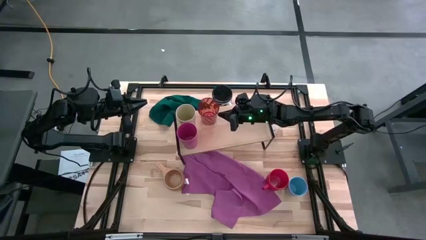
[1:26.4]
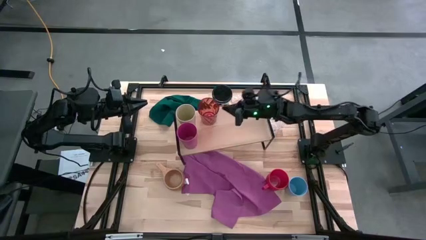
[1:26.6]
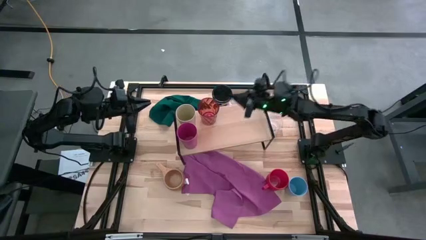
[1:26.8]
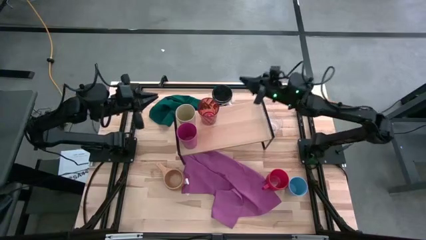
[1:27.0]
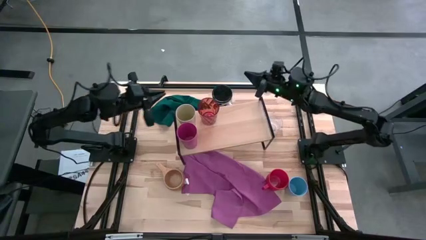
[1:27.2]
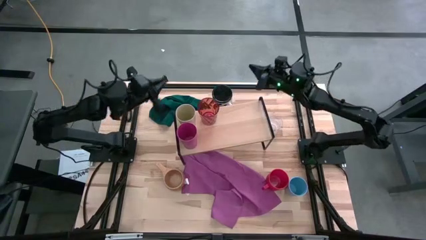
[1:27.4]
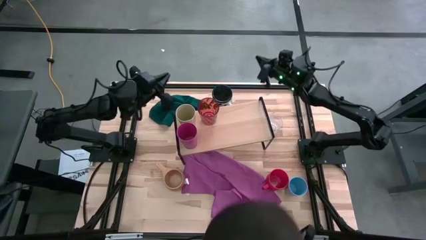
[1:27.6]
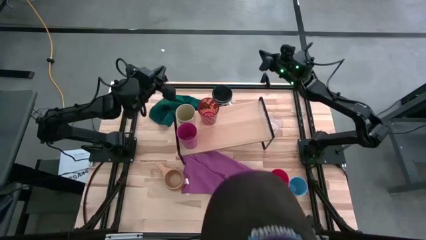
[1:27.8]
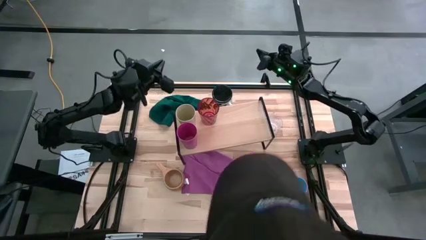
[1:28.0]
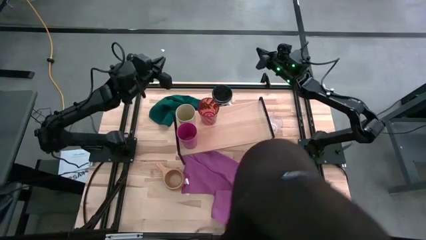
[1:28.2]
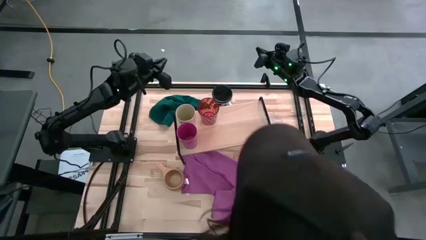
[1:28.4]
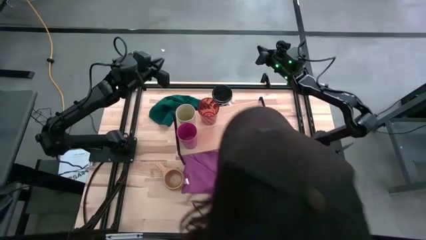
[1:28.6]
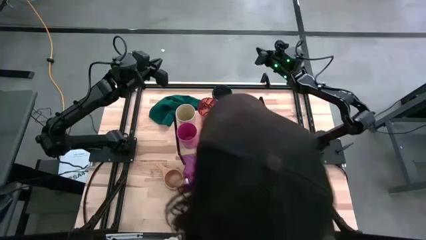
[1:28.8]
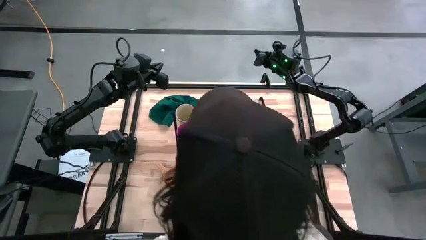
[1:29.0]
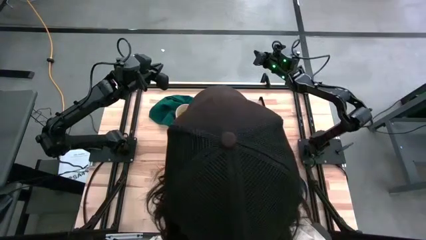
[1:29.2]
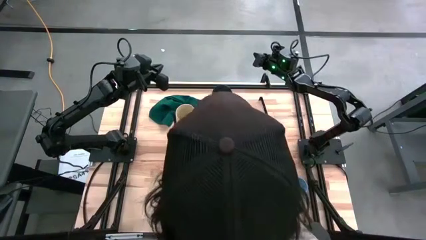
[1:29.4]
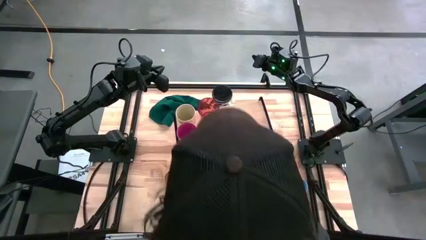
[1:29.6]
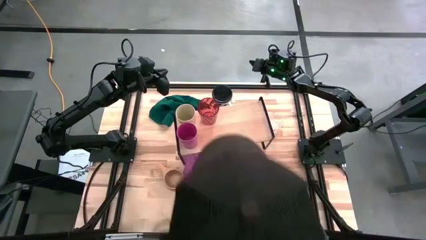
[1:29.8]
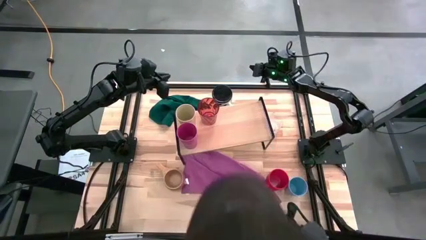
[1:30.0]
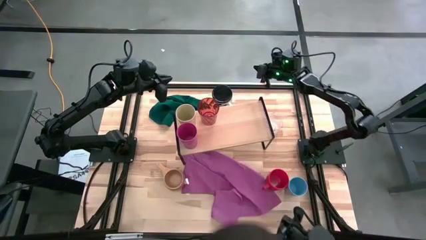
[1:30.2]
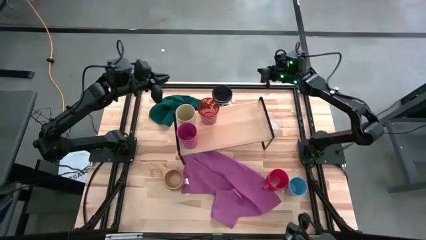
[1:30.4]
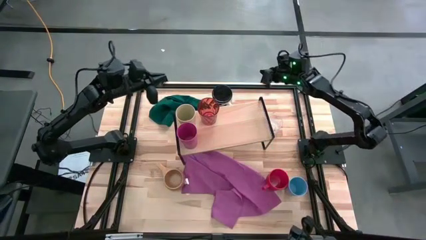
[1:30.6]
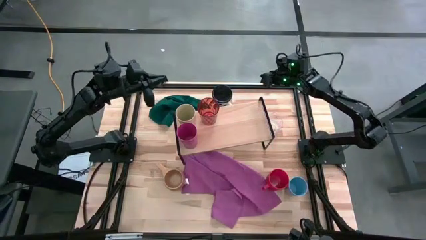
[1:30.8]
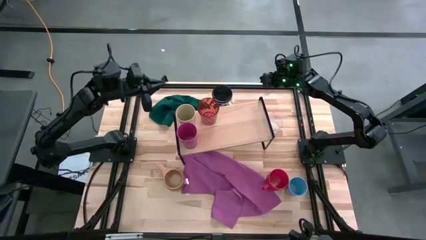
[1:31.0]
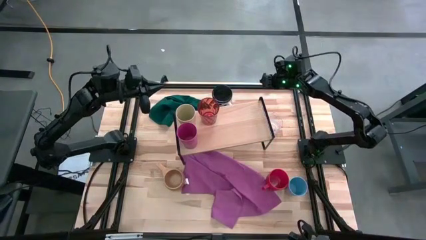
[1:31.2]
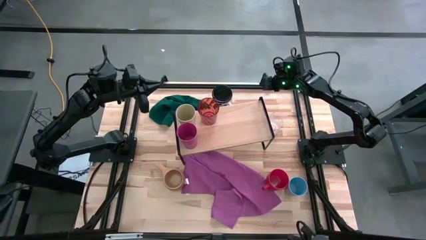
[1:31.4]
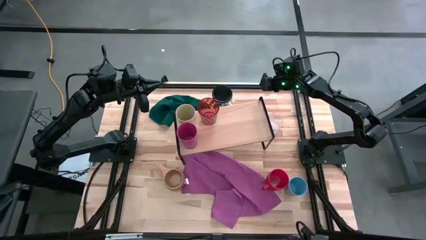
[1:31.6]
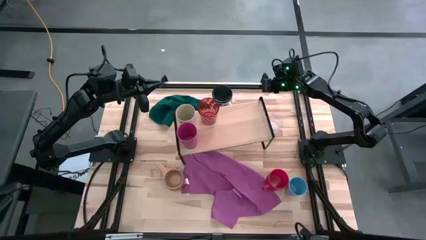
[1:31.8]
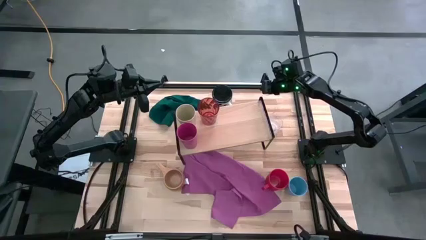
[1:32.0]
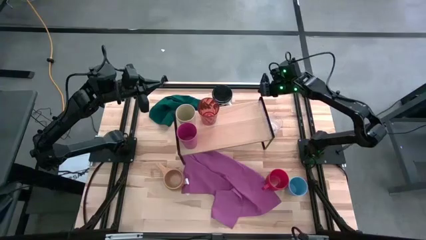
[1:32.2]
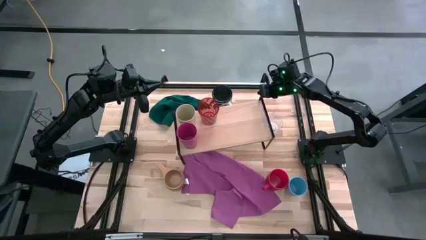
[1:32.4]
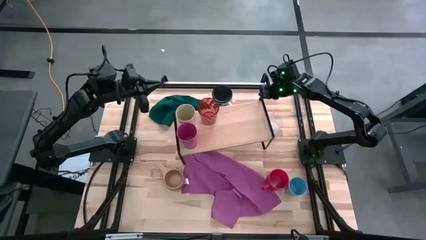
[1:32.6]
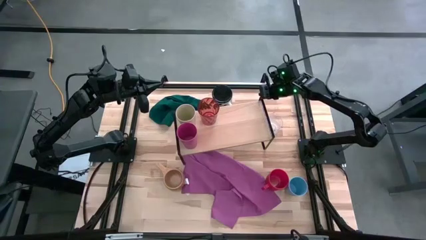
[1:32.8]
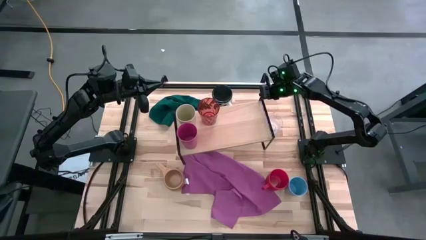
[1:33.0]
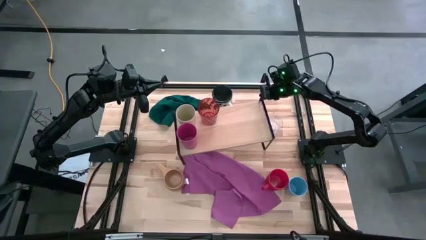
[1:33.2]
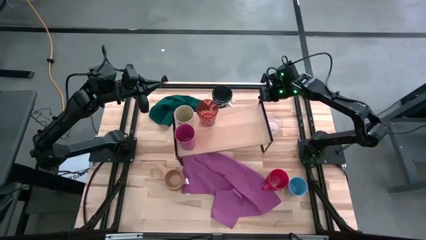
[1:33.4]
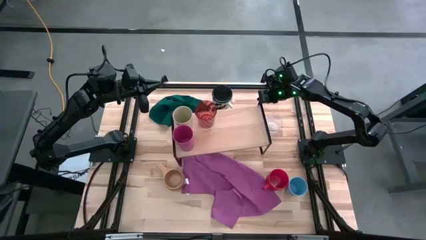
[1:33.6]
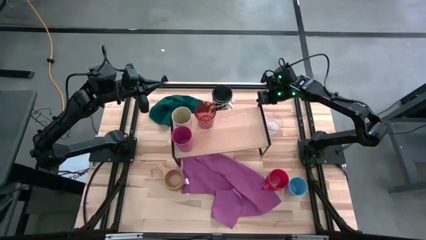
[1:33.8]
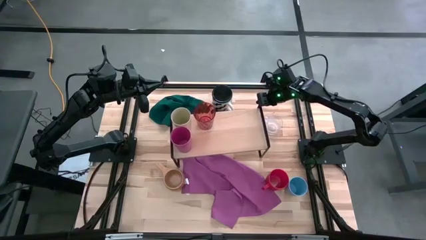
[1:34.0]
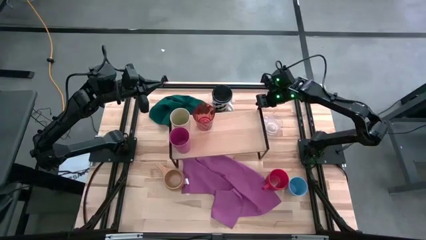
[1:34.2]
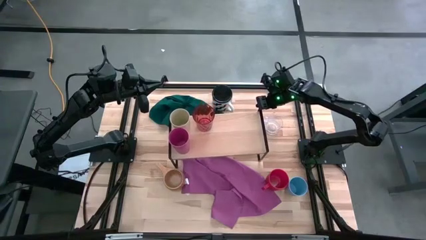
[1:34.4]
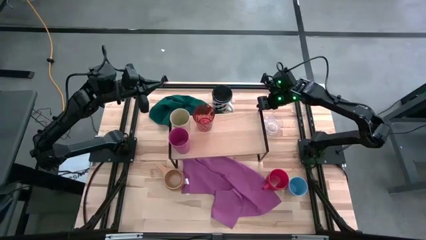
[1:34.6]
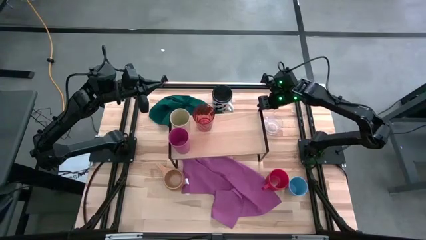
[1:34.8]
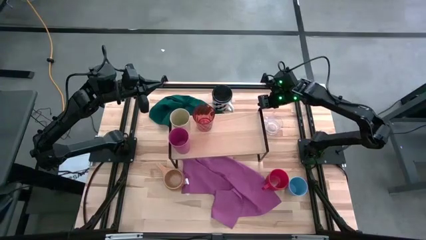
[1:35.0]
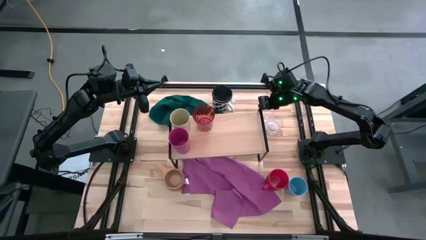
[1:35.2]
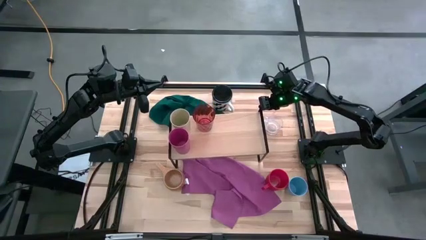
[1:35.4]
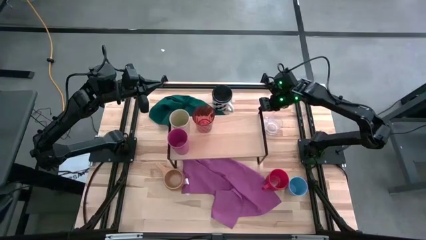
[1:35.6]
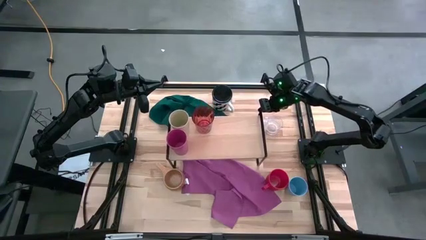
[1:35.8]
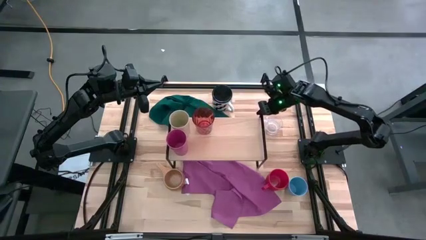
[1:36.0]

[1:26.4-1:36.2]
Task: Stack small to large cups/mugs on shelf
Adjust the shelf

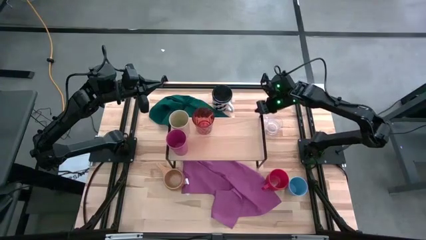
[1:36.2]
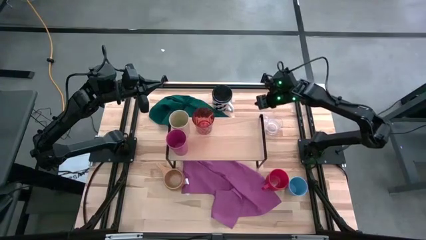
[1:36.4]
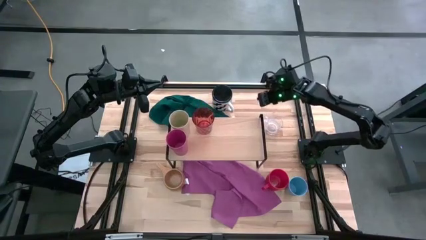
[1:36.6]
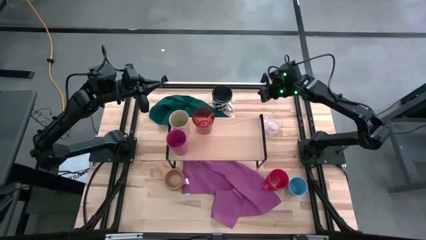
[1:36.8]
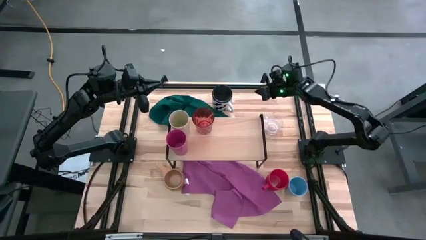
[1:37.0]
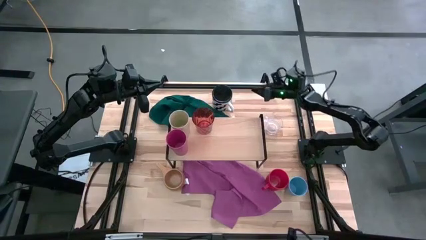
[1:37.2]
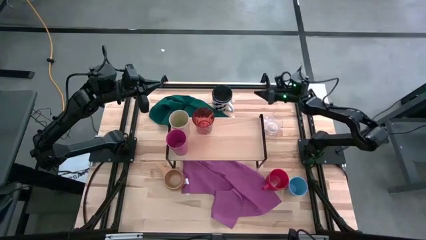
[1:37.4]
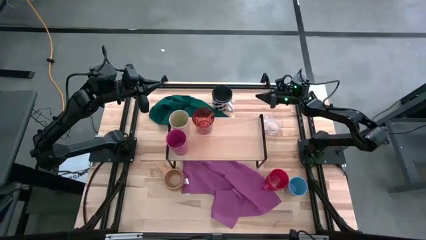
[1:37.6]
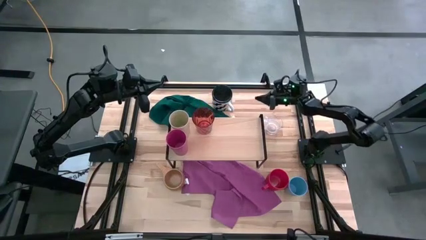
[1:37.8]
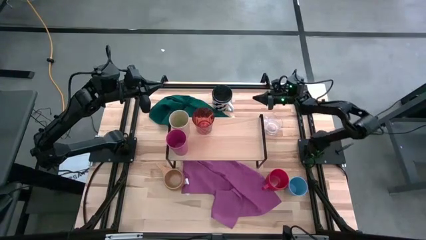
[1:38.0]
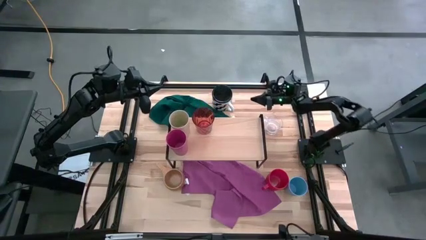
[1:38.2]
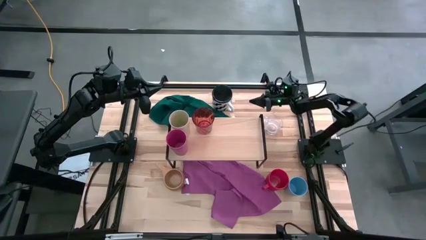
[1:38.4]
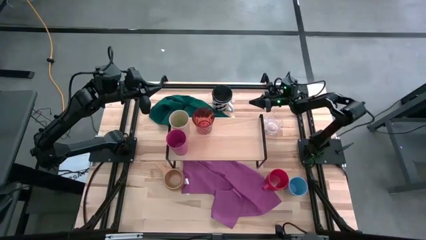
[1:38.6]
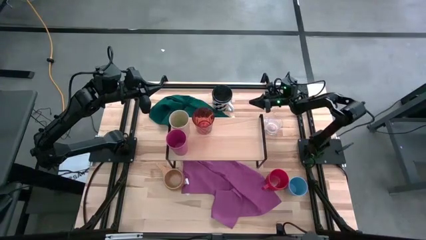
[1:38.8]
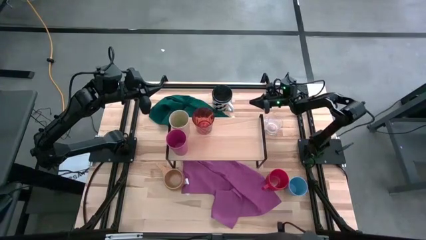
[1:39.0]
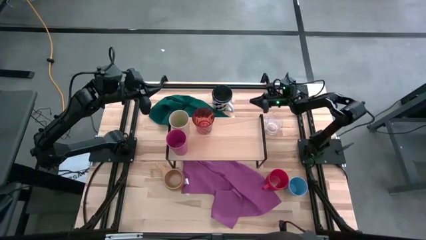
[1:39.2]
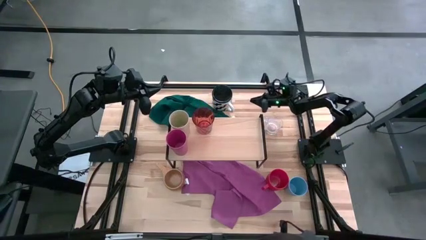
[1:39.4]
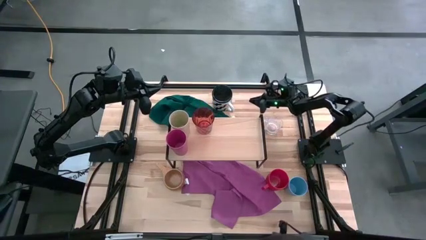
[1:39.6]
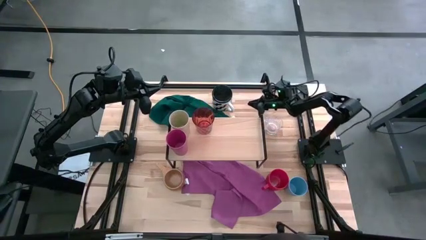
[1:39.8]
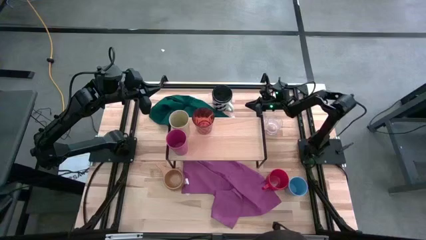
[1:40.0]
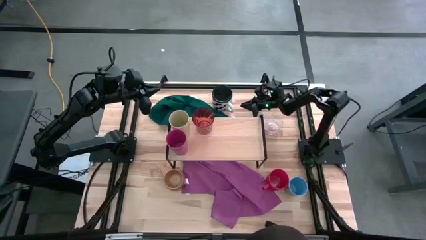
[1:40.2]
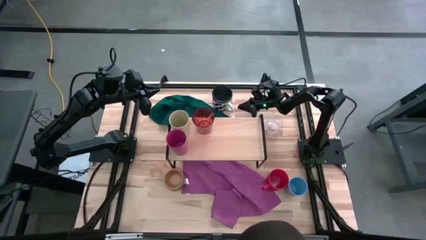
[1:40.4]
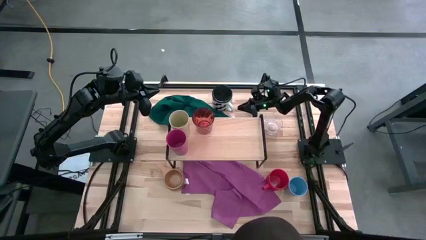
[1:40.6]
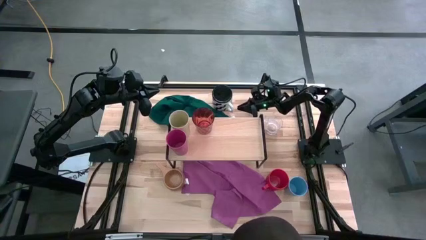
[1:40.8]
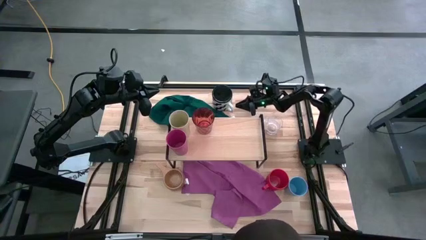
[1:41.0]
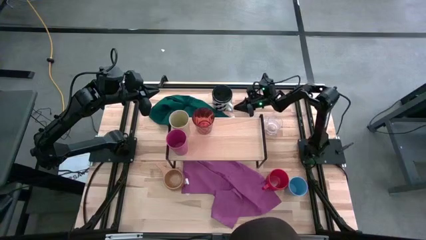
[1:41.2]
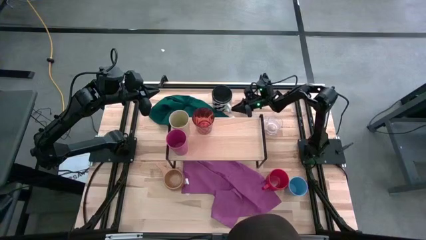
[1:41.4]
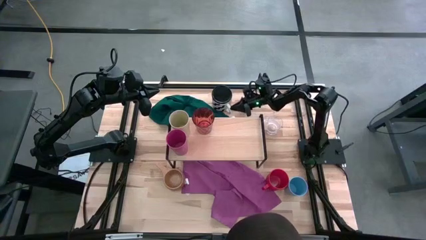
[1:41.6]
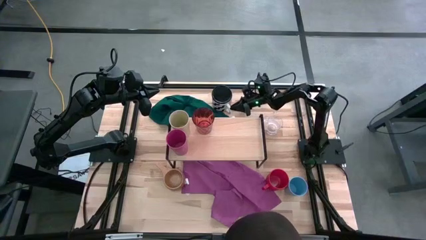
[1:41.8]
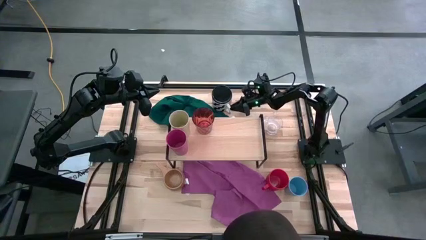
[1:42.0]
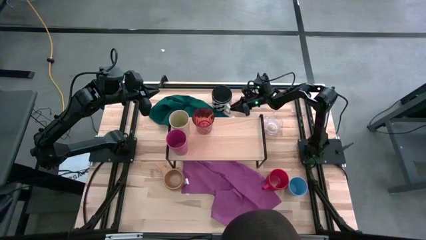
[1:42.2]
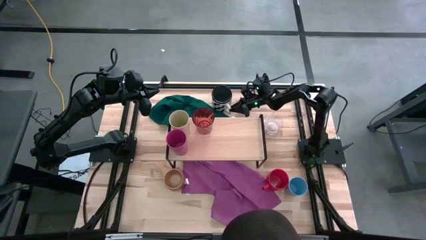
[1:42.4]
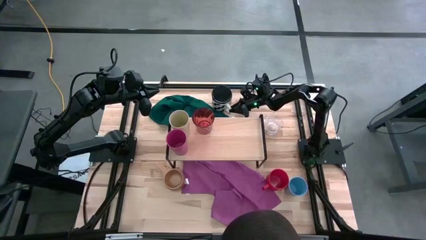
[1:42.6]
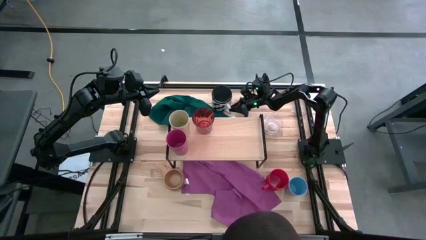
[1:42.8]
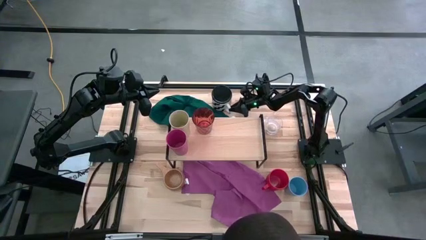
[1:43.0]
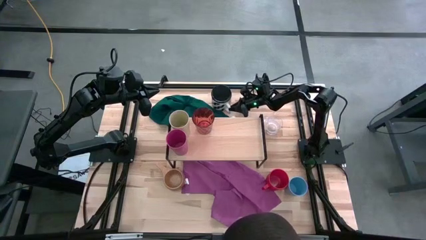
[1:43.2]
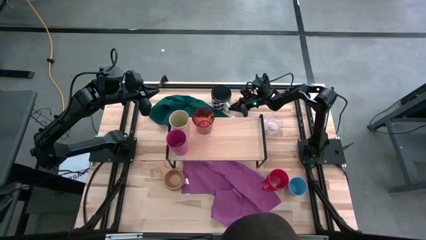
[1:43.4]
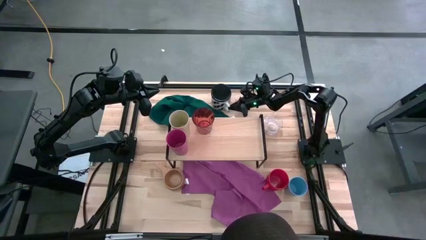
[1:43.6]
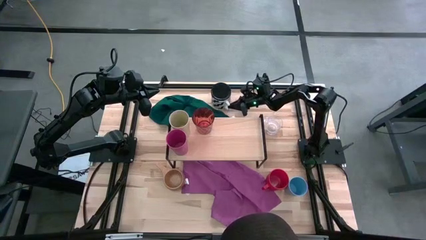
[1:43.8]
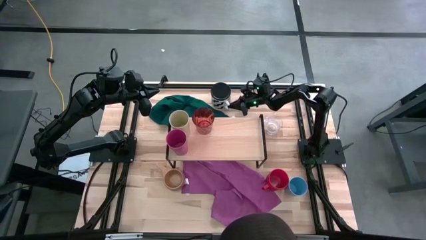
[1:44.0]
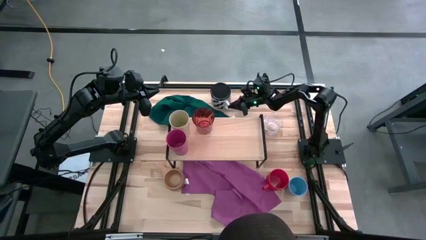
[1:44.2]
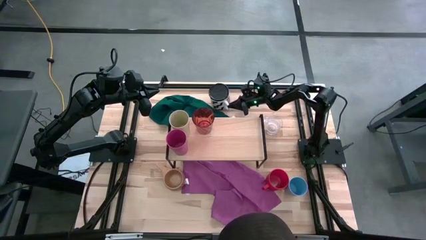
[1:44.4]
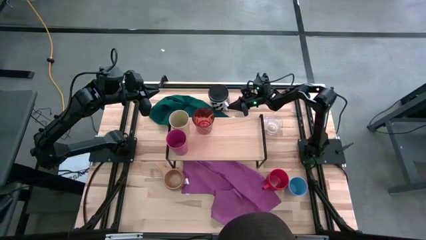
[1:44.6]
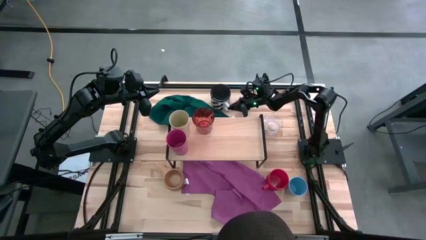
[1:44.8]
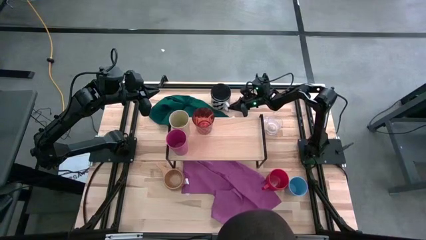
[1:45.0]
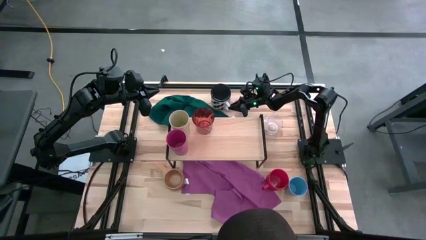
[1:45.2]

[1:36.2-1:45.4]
Put the white mug on the shelf
